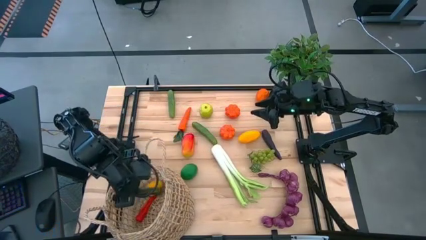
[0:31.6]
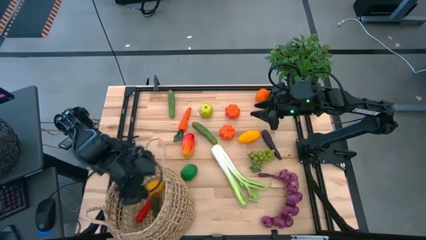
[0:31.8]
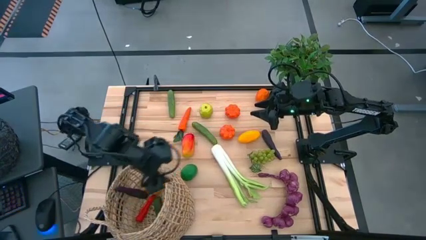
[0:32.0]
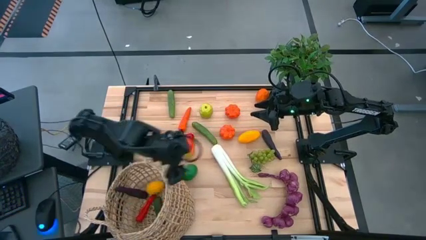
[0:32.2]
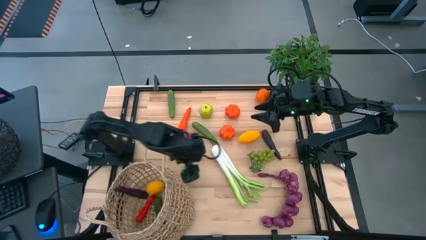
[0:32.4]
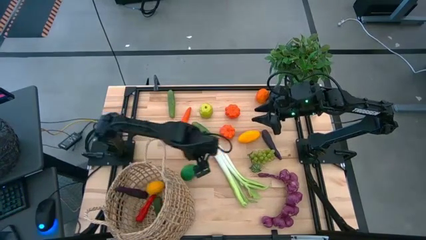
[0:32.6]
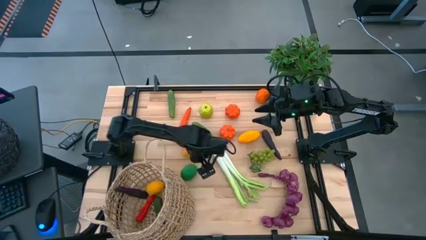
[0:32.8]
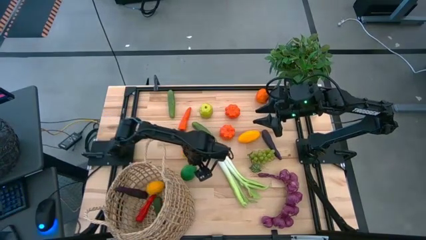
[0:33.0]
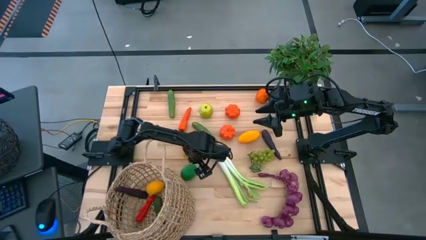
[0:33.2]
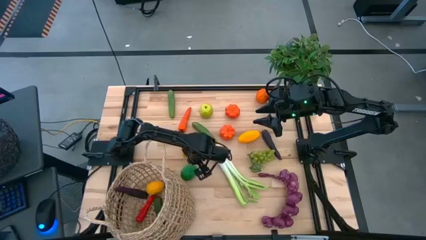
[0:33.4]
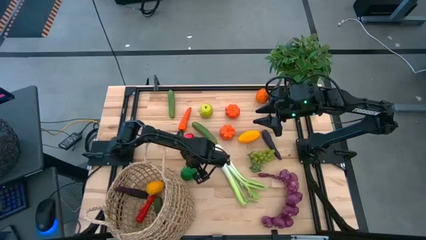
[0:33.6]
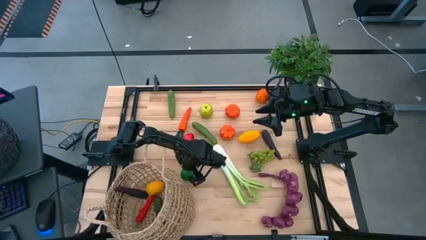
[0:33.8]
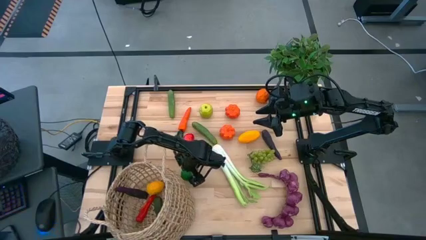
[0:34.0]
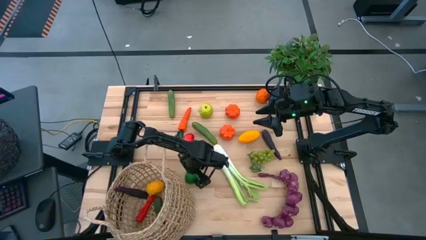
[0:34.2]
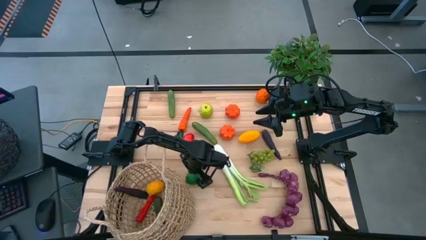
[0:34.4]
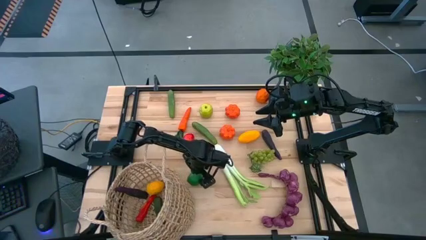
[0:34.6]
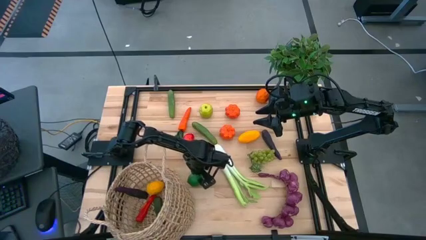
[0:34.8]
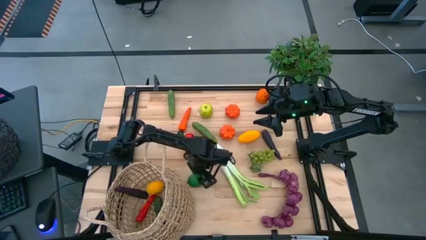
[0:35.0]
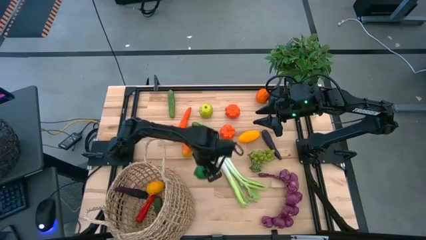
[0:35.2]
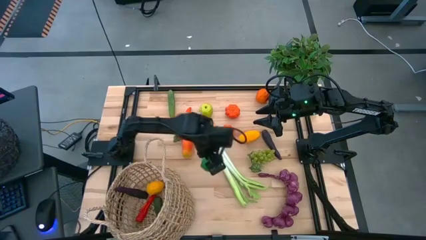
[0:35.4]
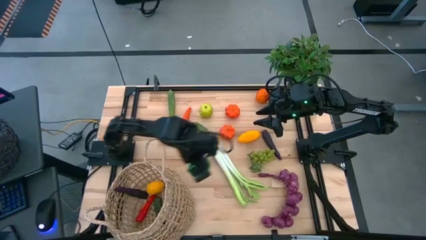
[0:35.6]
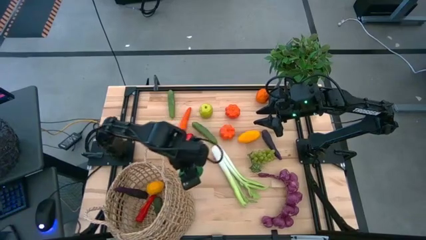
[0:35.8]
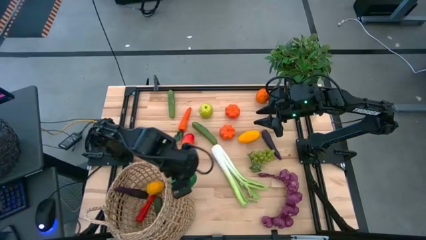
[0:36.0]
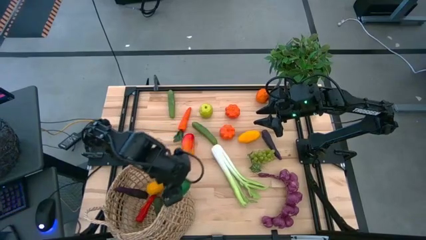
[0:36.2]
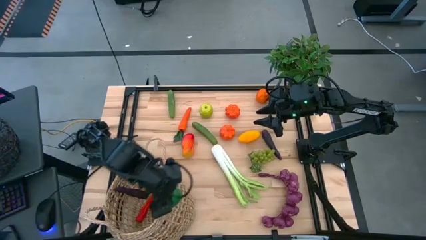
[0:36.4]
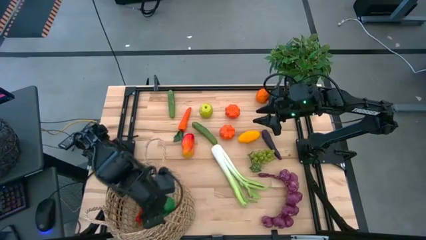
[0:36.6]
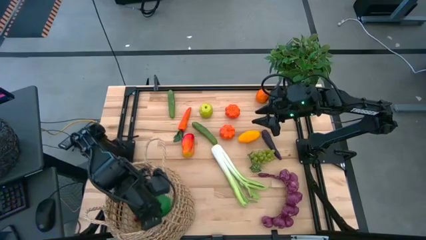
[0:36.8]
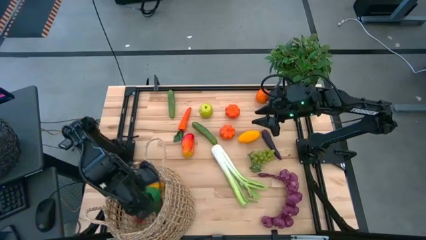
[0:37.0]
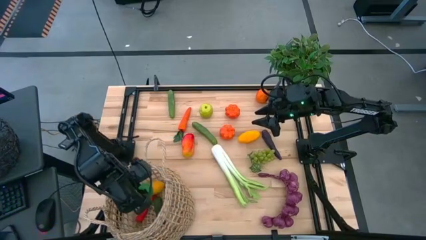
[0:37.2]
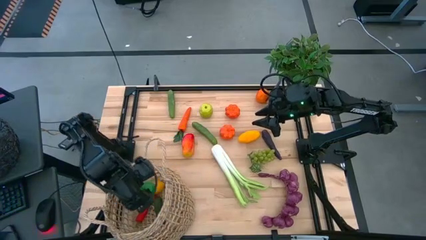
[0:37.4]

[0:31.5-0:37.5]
Task: Build produce basket
Put the lime into the basket

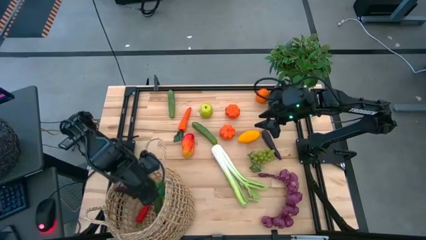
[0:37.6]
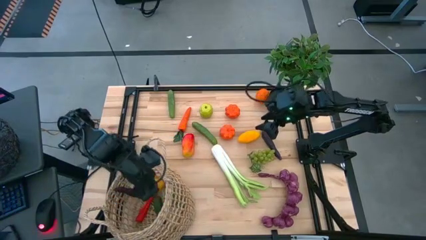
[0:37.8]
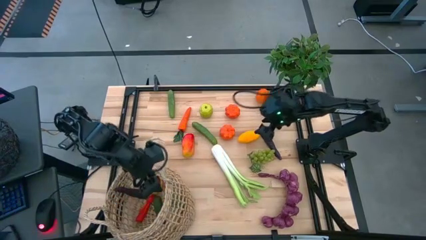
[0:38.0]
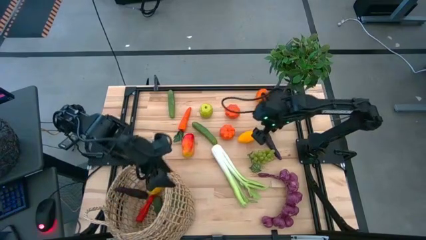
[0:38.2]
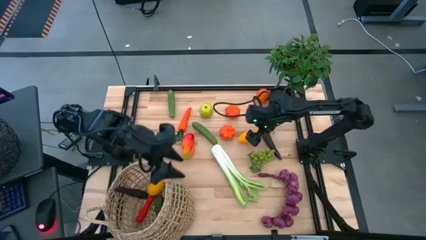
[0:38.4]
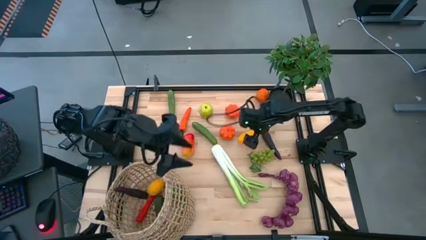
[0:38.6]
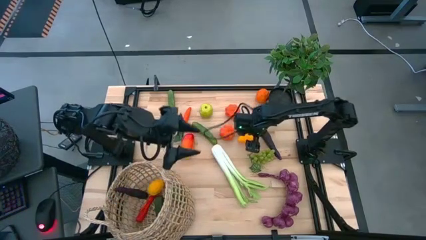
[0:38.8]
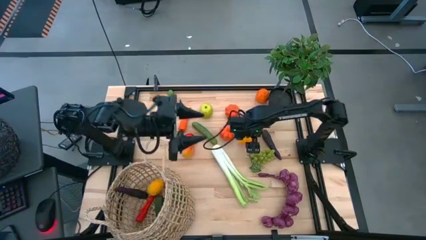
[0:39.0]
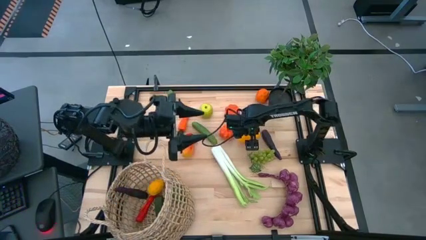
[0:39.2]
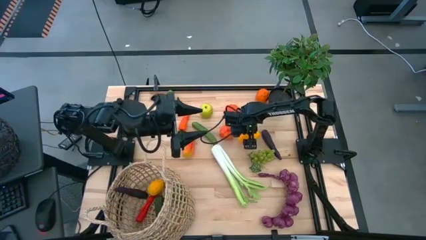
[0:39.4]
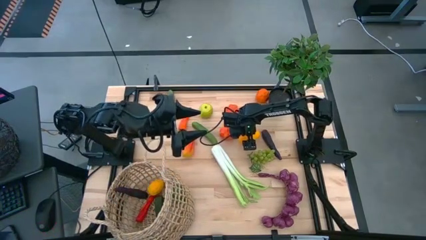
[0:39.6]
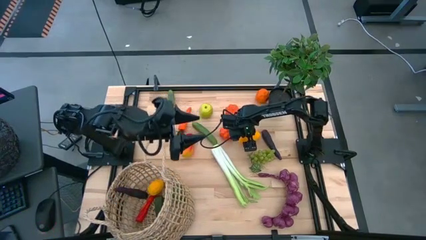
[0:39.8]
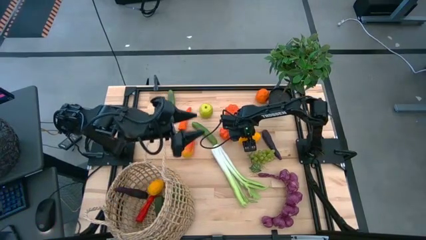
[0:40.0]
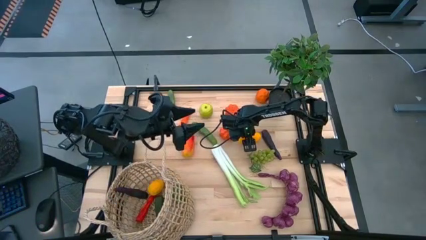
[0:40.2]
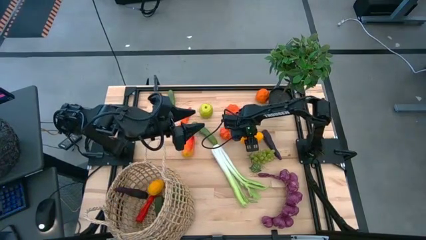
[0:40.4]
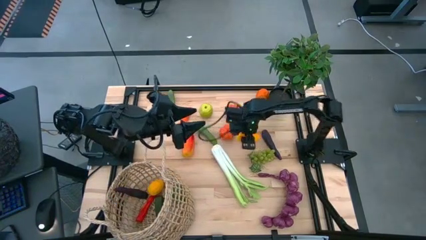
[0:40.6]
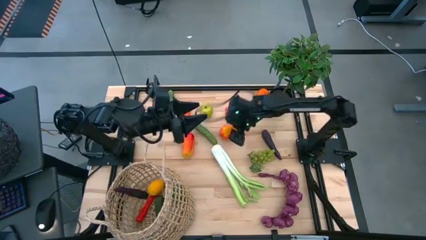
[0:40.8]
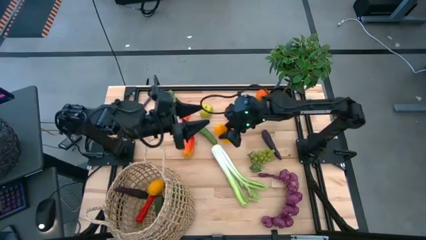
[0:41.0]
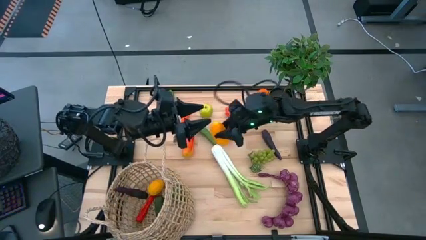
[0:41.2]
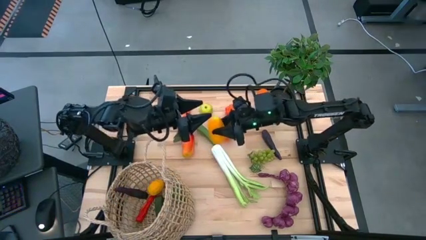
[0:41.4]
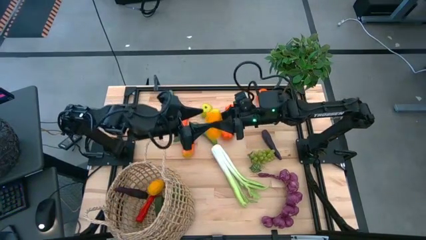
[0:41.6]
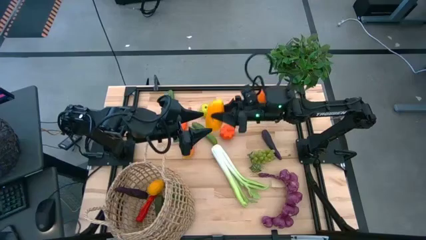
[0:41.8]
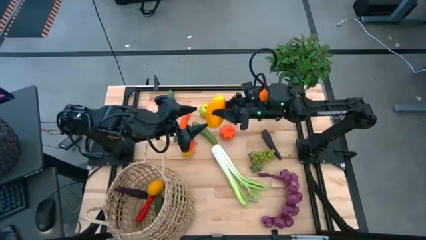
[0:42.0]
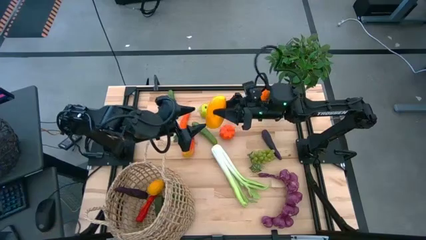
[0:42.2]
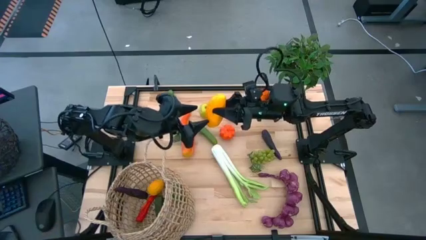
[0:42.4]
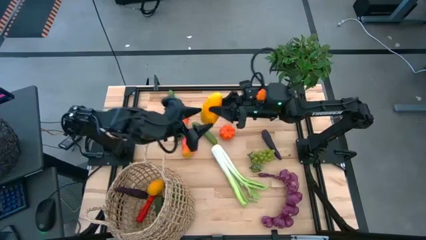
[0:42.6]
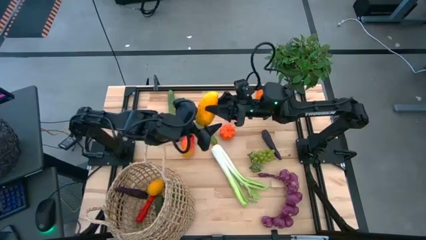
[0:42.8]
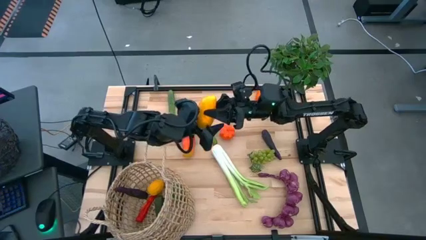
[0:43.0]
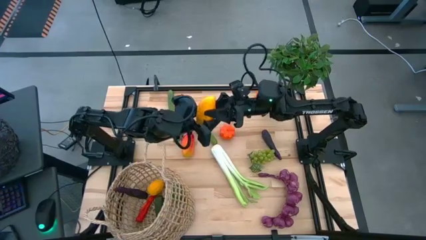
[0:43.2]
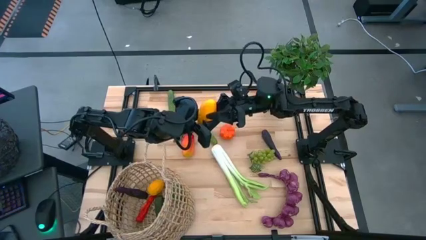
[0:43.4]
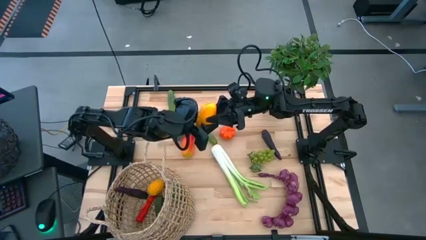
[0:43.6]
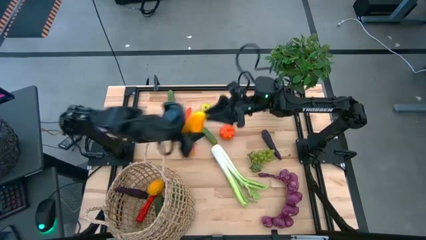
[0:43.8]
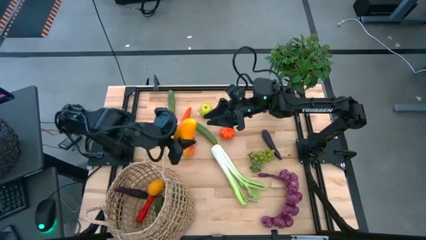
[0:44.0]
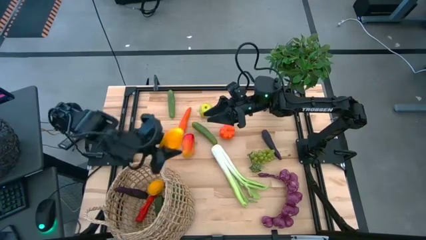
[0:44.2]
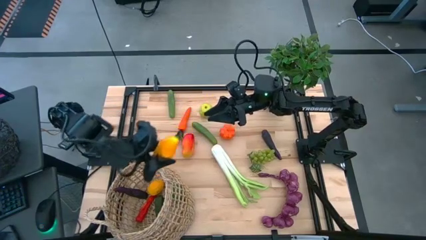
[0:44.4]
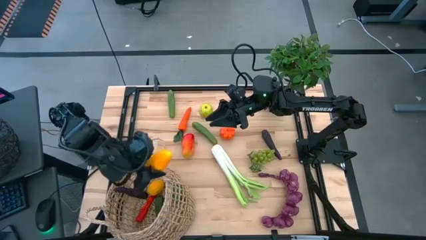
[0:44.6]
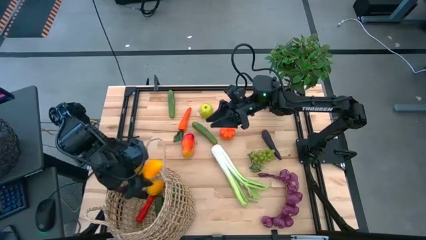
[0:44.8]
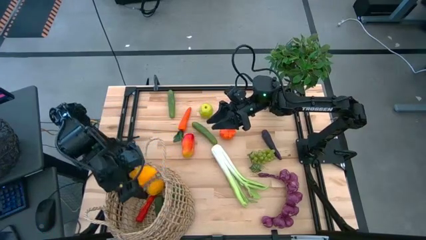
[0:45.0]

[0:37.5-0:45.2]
Put the right mango into the basket

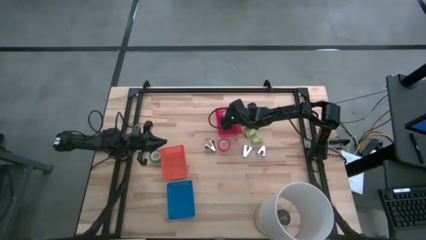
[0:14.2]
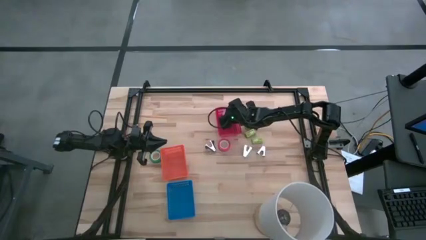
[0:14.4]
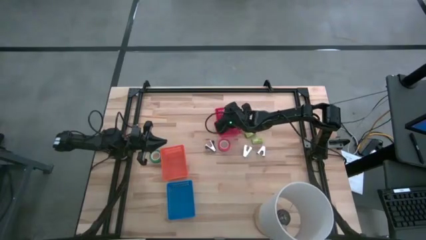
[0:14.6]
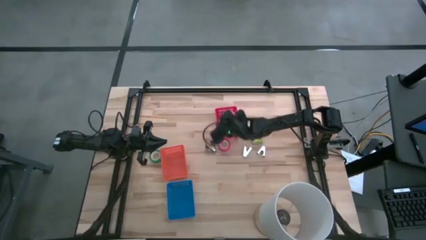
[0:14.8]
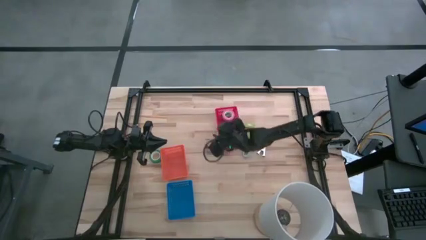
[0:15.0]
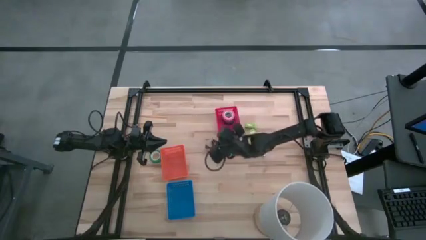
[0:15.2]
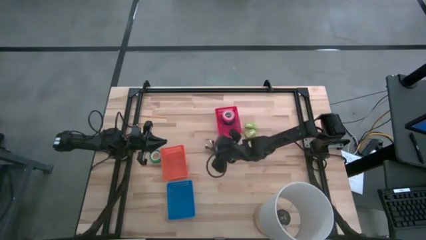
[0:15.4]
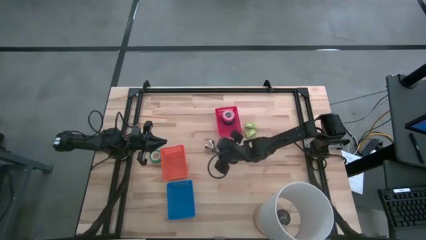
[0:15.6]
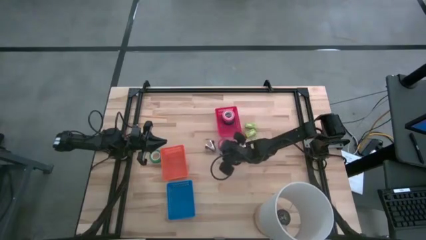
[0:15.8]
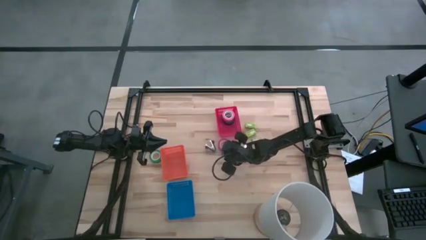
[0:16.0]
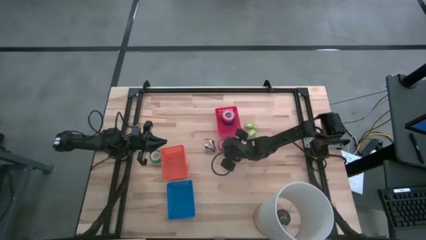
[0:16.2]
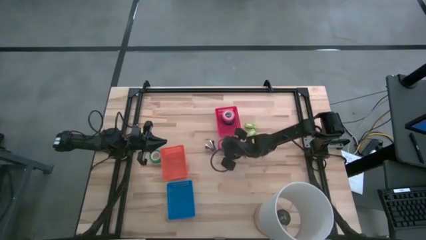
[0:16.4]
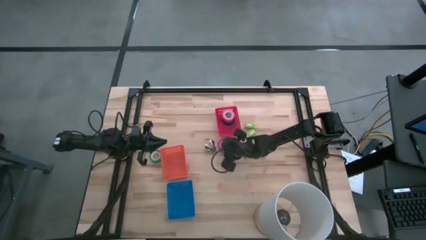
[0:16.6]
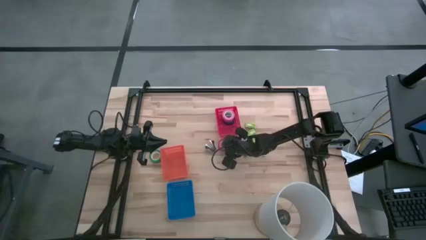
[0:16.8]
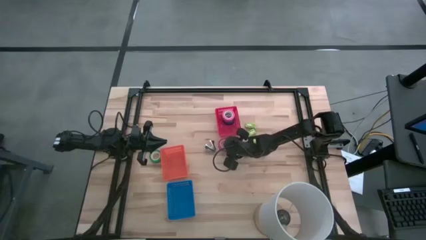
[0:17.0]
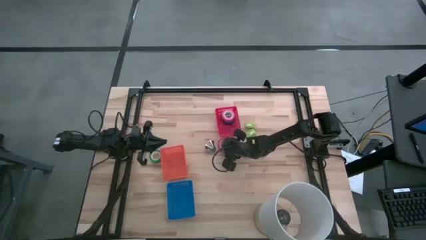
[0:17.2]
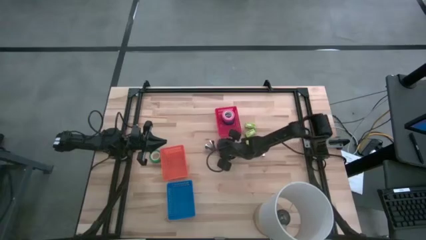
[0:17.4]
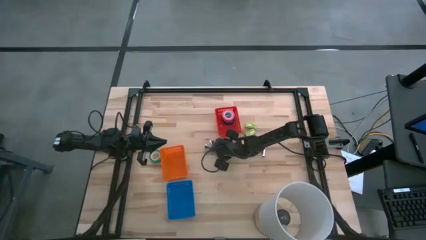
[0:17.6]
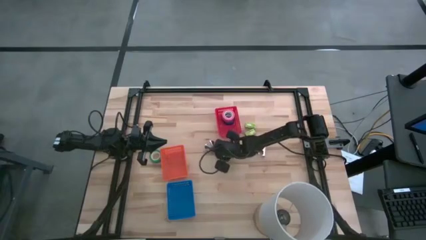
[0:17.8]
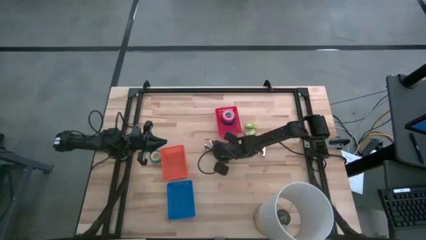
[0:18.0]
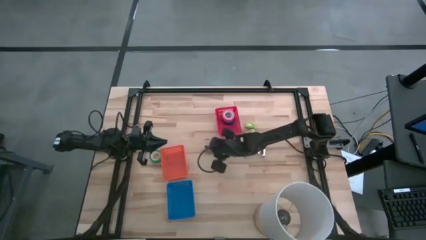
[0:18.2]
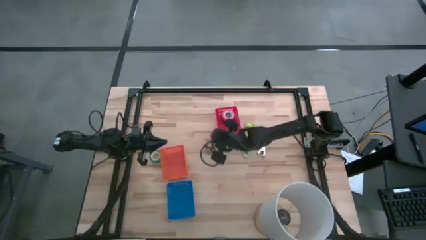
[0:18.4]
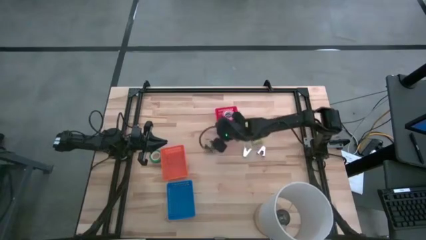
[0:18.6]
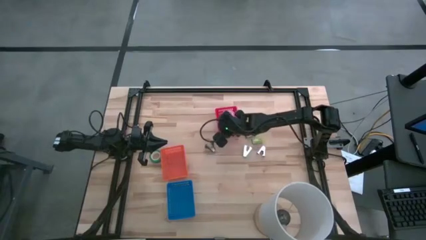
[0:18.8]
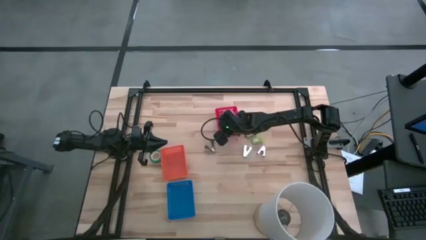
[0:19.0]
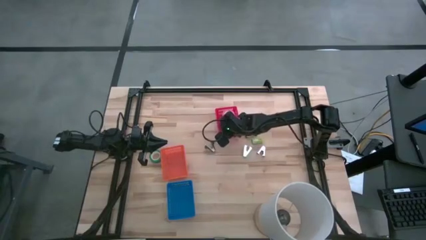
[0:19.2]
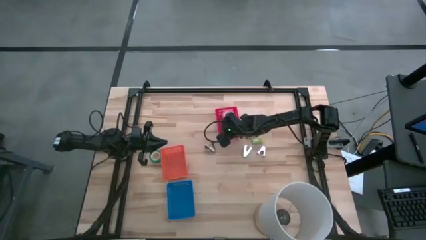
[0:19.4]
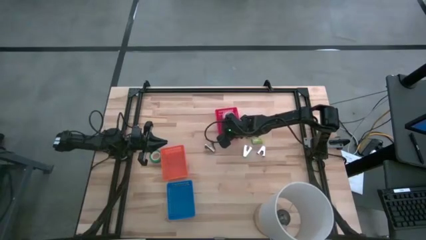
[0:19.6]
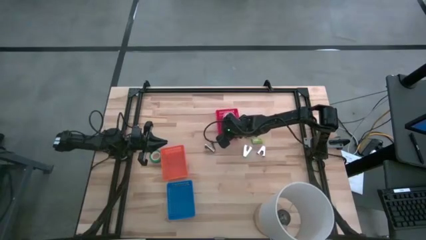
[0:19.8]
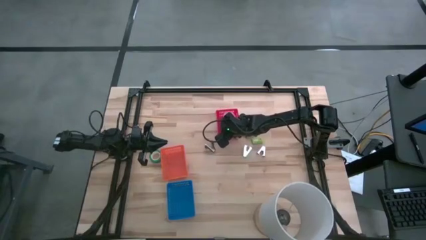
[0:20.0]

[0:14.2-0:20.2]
Task: Pick and place Stapler, Stapler remover, tape
Put the red tape into the red bin
